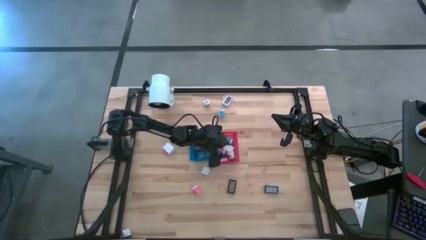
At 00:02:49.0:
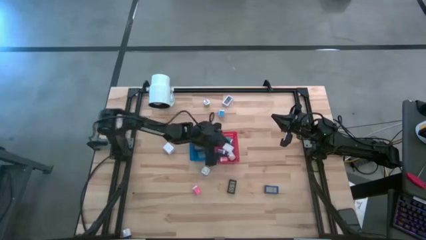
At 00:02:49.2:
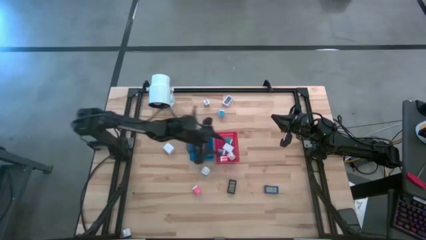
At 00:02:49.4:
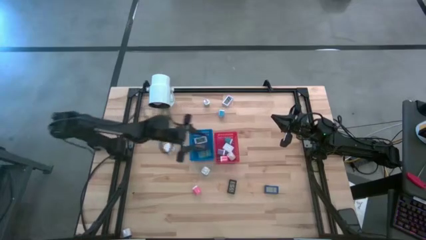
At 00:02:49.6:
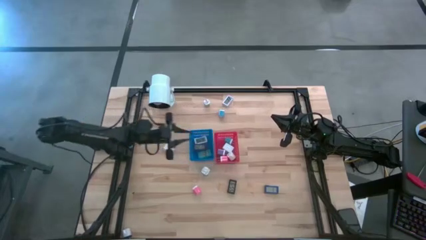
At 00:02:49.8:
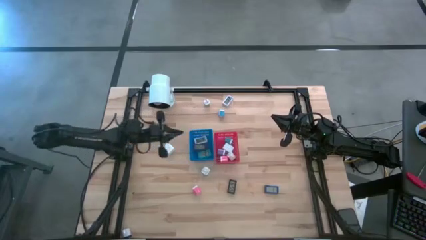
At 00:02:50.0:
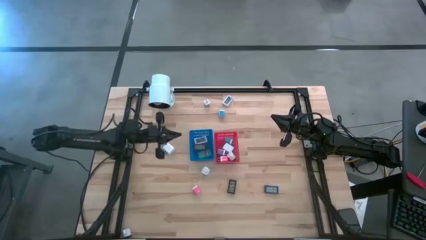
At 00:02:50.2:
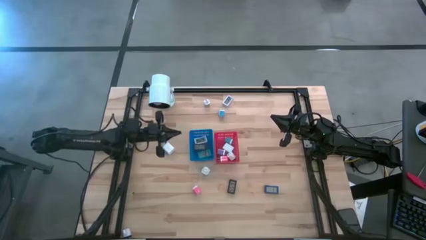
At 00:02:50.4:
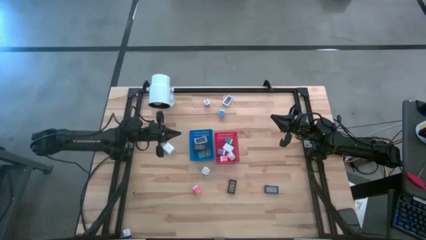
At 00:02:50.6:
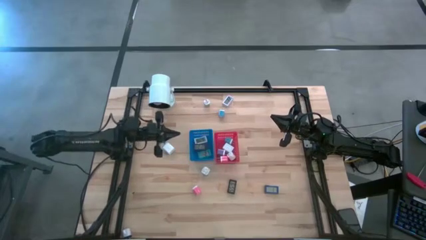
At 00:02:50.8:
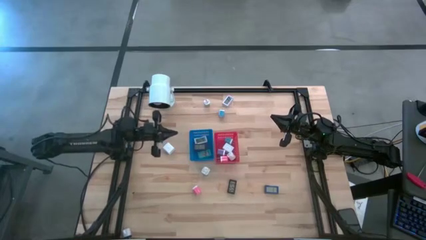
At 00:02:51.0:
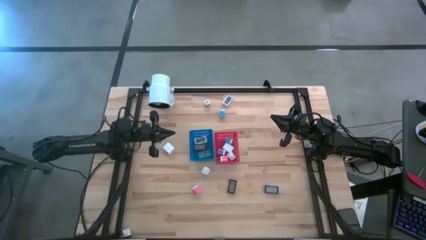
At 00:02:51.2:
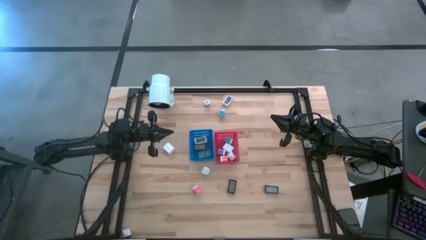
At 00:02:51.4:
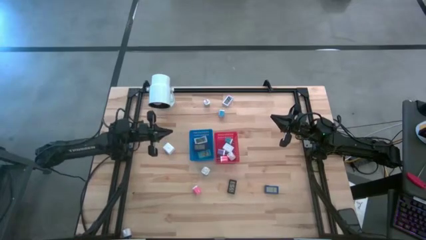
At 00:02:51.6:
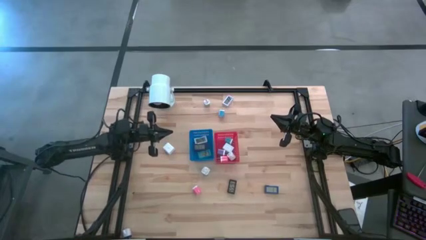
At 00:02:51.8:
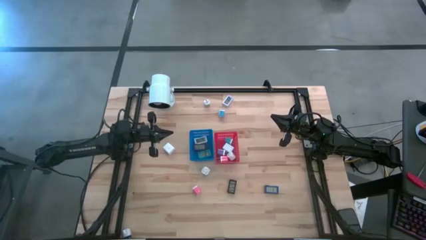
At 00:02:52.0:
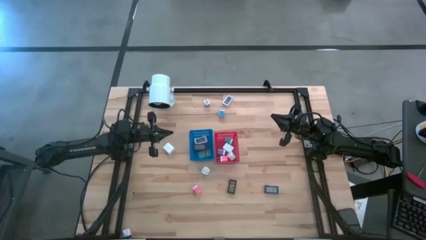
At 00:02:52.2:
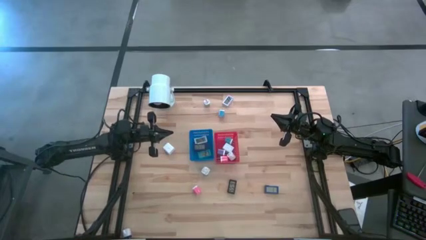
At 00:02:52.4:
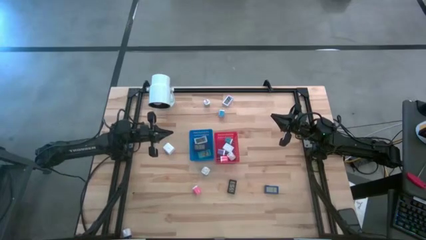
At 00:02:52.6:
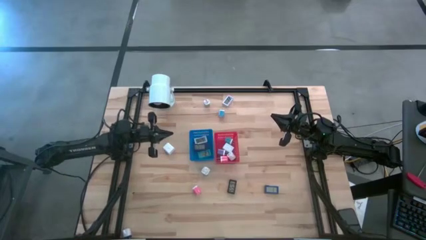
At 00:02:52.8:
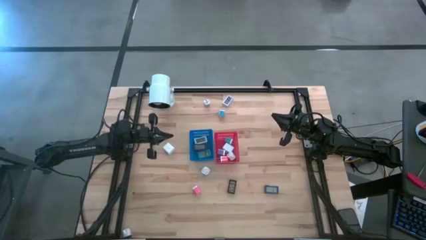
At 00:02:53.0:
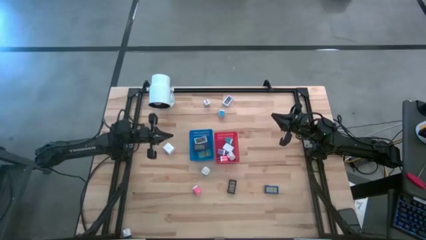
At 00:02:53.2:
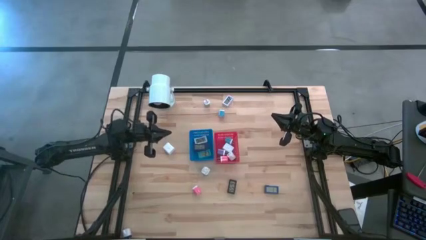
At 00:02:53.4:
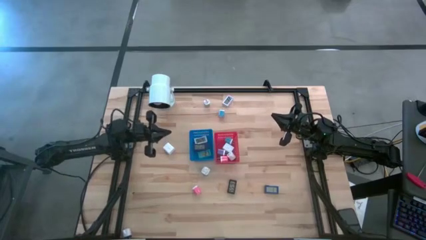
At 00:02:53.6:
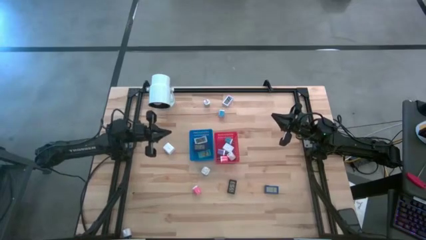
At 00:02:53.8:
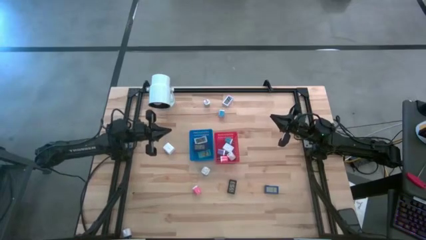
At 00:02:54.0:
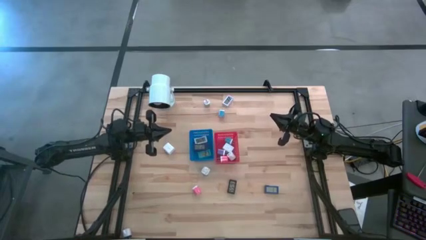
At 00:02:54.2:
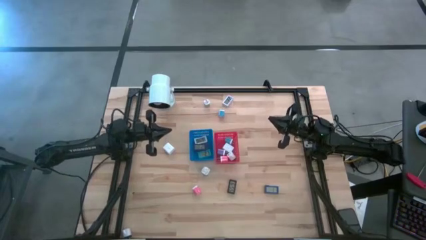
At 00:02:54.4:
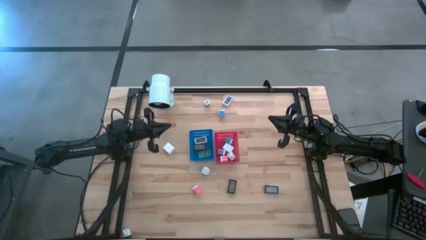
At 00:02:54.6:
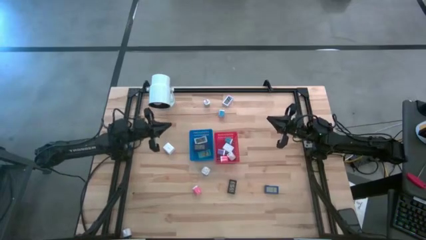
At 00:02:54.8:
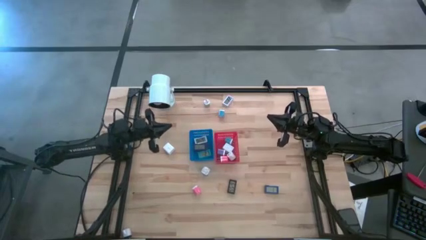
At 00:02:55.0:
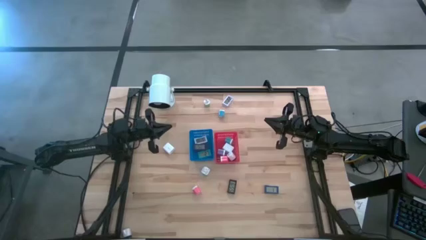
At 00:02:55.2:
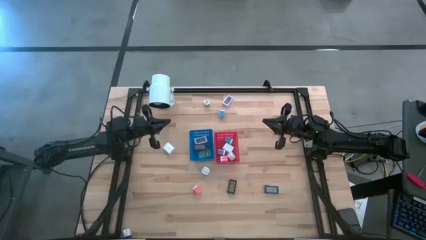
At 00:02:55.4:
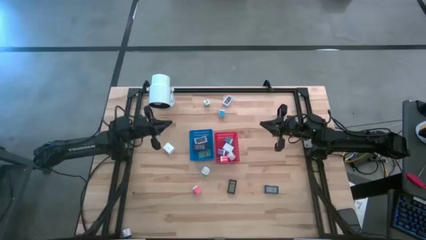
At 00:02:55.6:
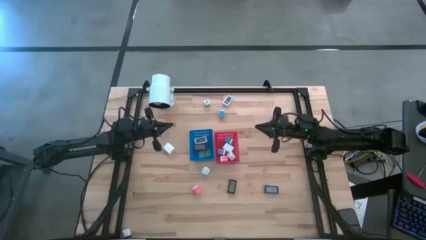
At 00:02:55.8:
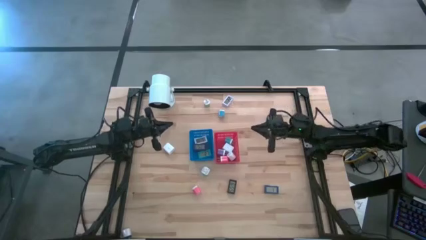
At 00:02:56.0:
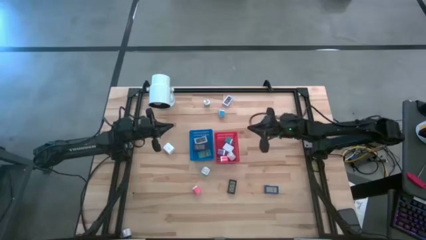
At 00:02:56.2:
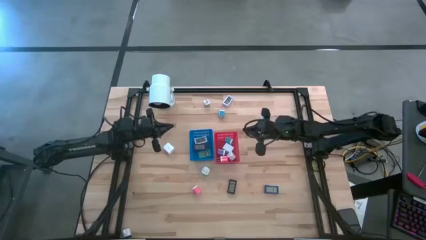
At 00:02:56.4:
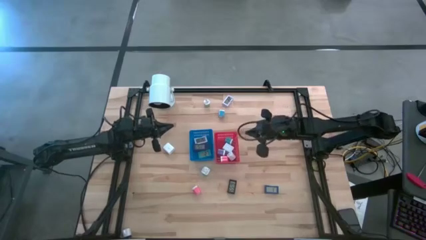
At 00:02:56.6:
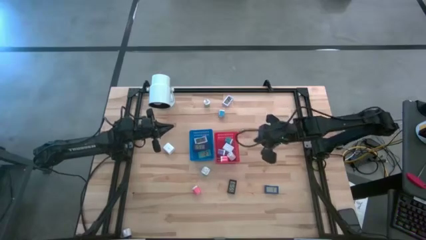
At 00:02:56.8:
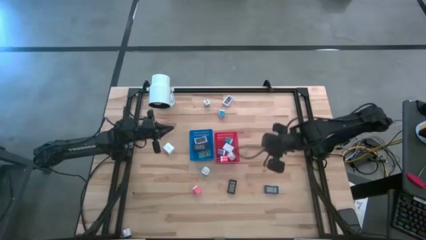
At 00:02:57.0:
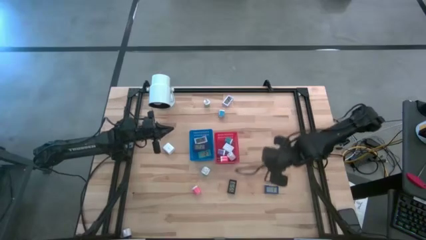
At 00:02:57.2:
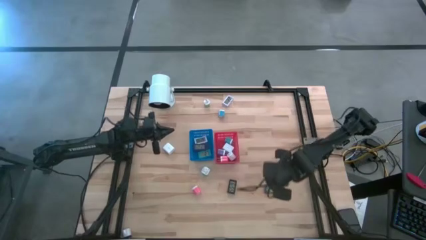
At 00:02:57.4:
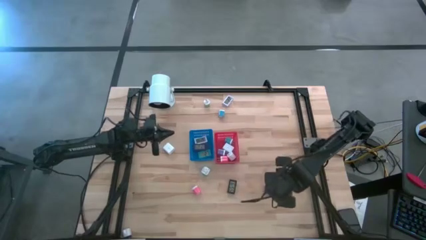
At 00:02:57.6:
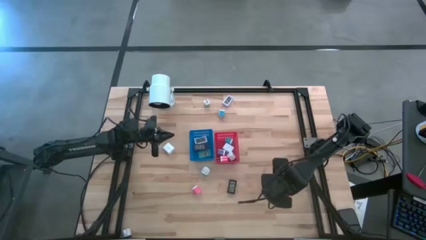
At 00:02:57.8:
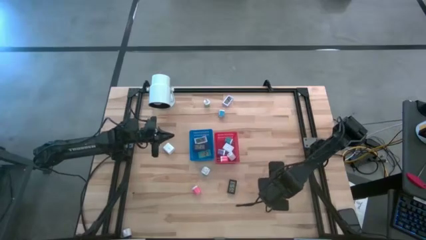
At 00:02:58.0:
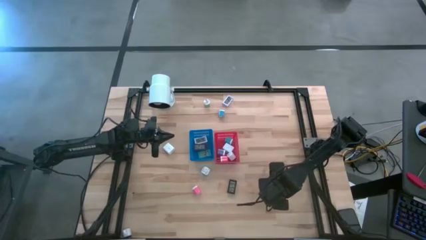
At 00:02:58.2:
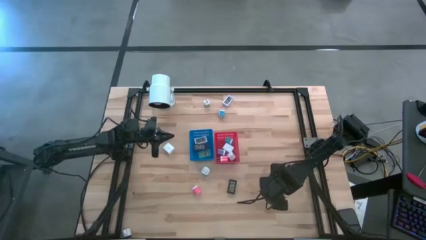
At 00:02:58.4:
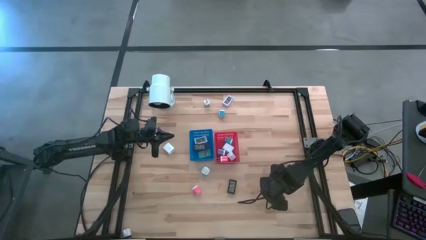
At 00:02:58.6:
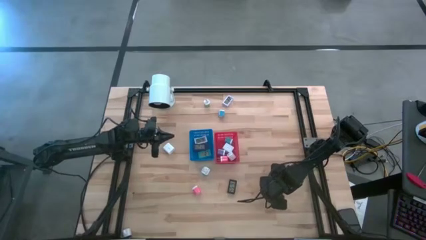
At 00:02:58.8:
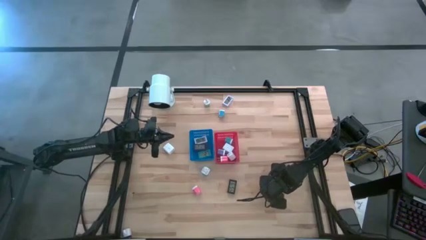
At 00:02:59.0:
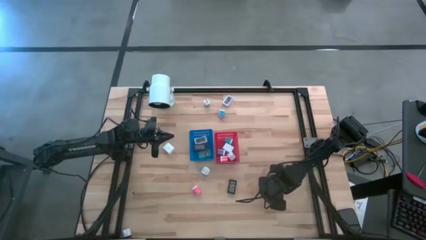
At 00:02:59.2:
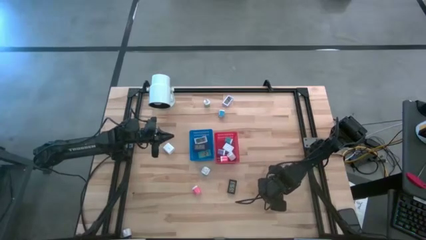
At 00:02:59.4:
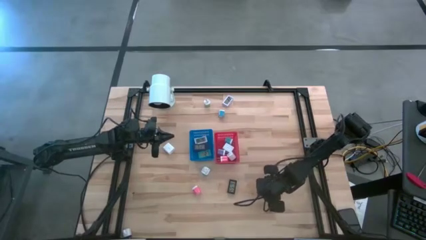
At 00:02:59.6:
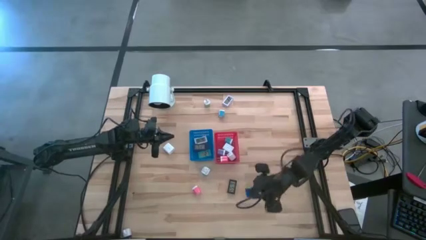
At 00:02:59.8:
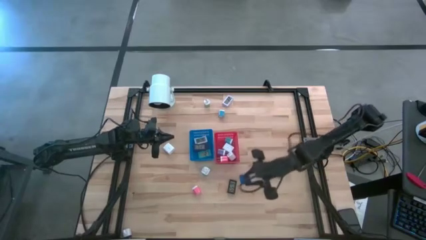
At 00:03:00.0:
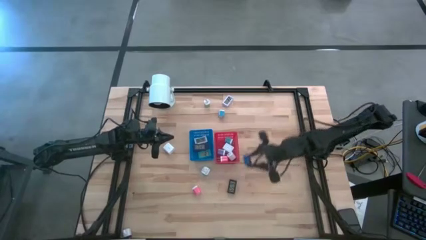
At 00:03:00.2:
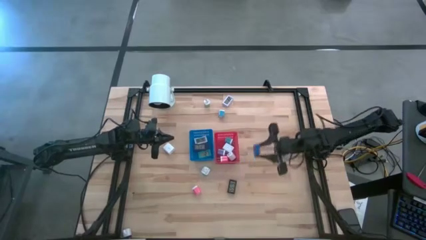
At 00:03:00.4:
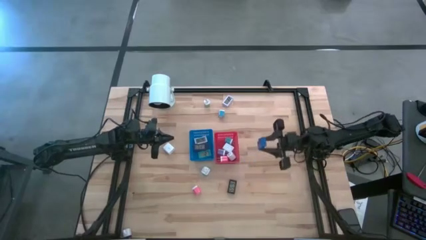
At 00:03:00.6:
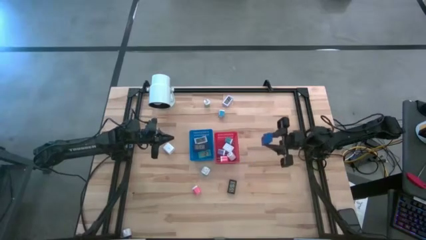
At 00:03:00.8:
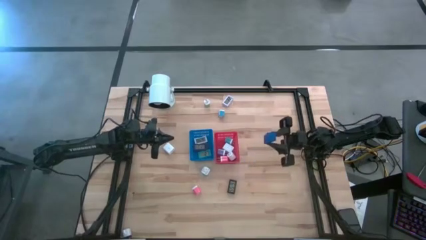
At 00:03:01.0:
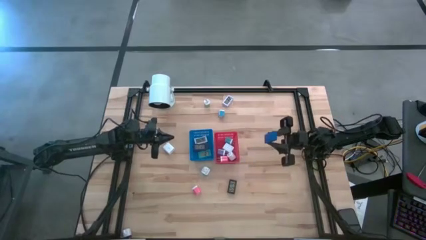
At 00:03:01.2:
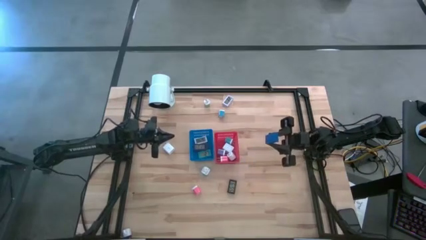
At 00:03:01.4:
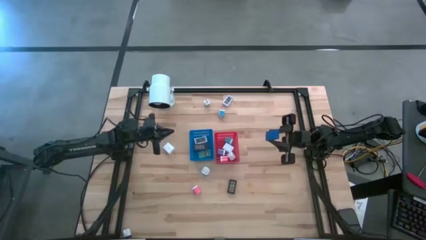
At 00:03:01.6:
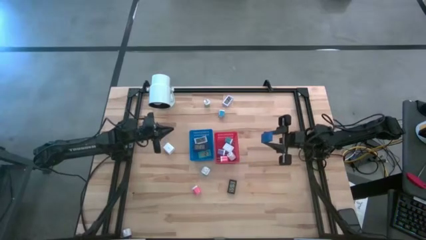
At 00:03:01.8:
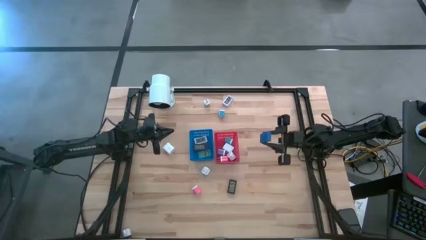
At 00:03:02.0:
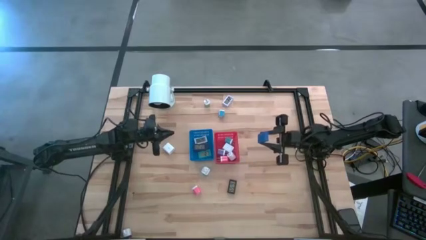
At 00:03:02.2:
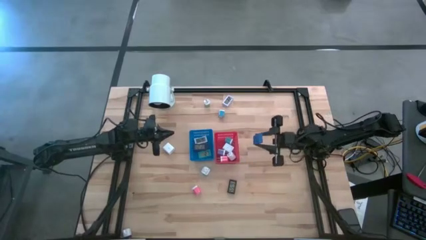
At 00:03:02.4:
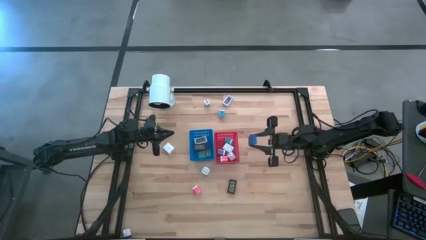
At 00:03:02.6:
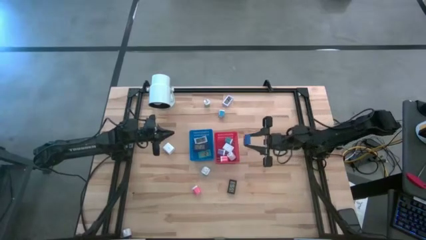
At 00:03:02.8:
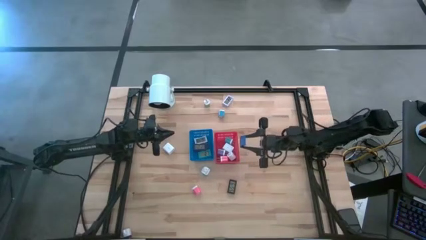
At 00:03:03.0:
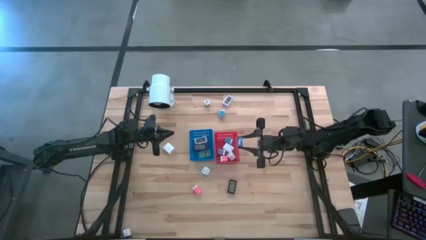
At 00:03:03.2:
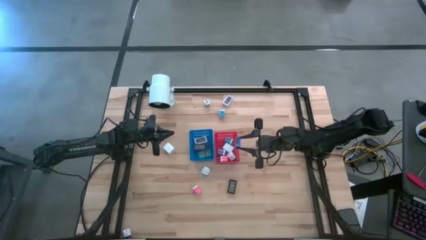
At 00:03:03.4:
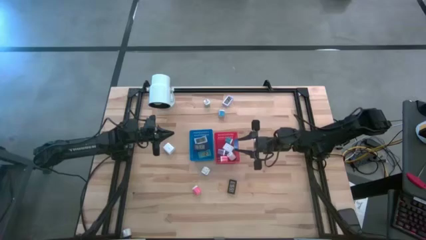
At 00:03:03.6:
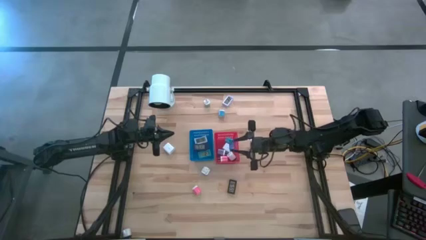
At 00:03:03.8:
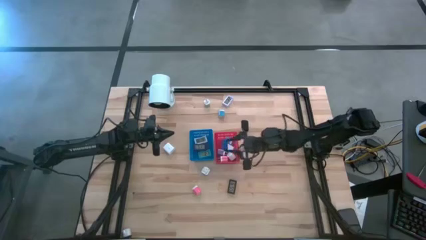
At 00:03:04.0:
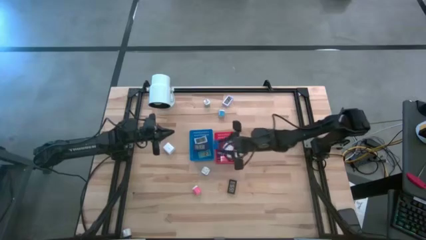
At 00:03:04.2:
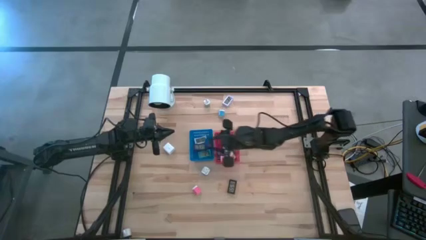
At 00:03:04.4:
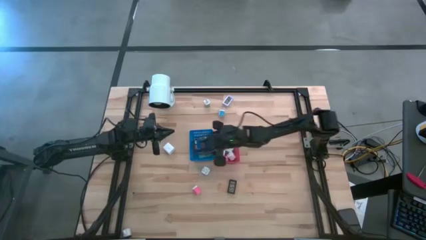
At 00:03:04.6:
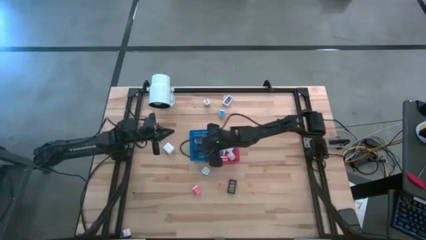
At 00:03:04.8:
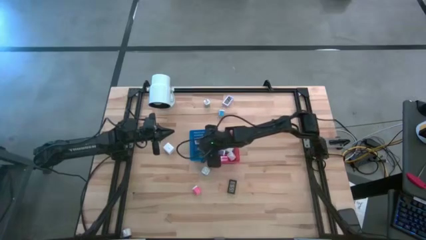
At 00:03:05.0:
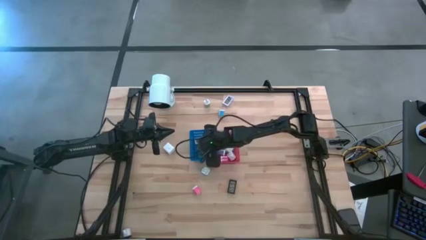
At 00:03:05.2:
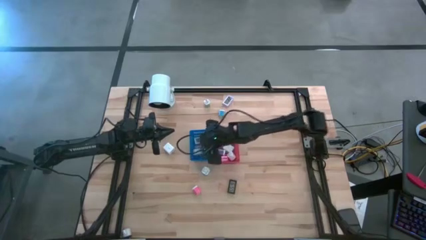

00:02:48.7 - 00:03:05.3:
Task: Pick & Place Office items
Put the dark blue digital clock into the blue bin
